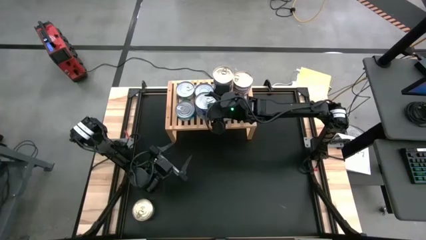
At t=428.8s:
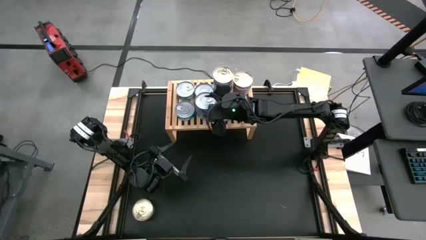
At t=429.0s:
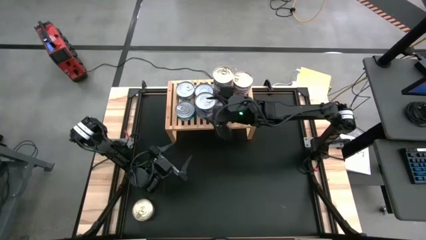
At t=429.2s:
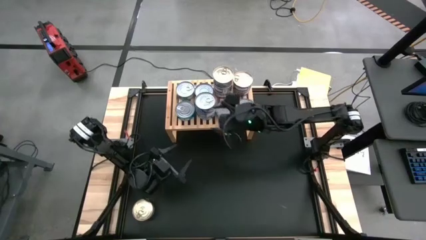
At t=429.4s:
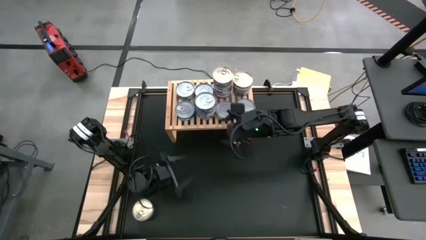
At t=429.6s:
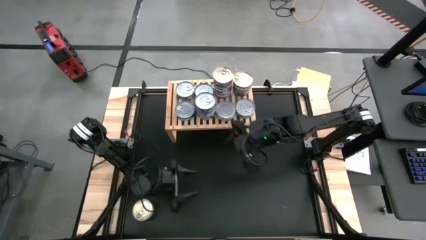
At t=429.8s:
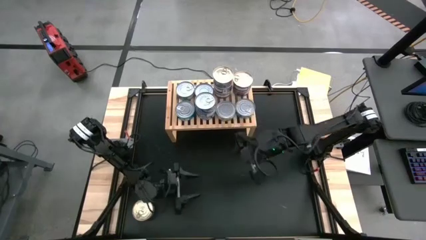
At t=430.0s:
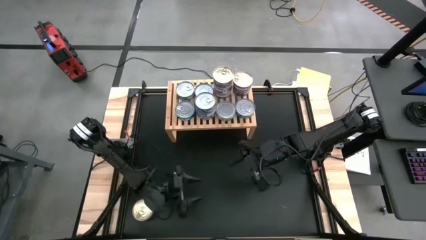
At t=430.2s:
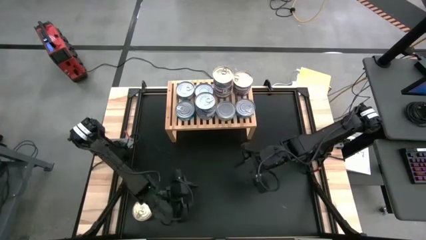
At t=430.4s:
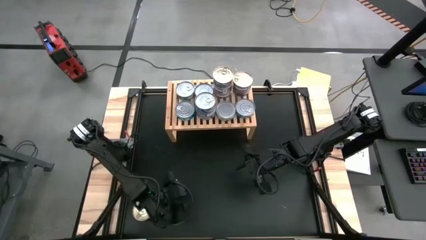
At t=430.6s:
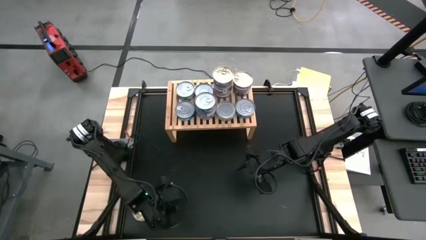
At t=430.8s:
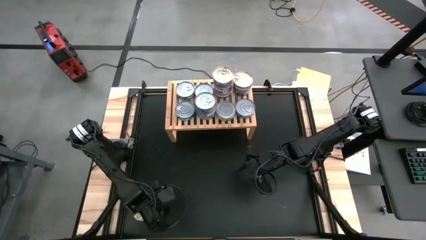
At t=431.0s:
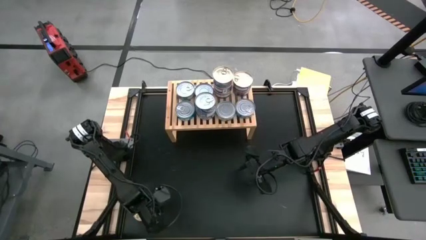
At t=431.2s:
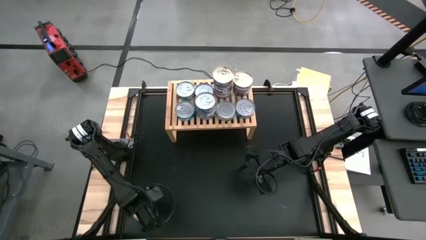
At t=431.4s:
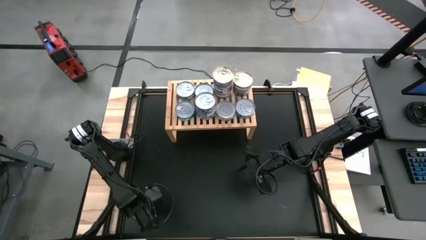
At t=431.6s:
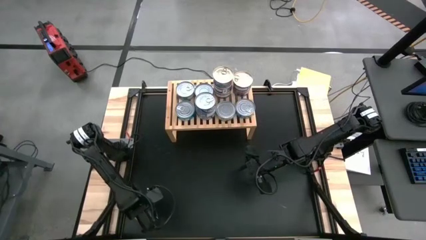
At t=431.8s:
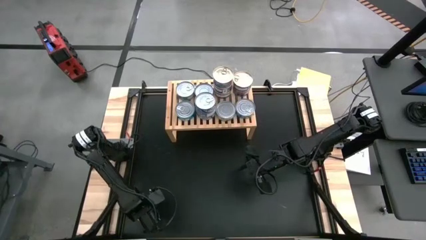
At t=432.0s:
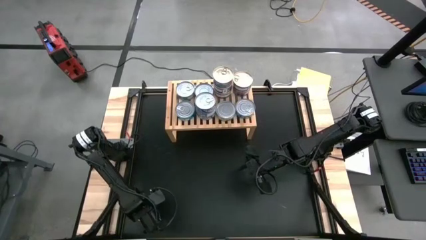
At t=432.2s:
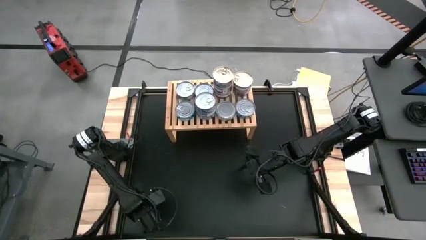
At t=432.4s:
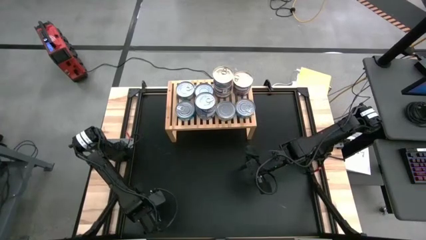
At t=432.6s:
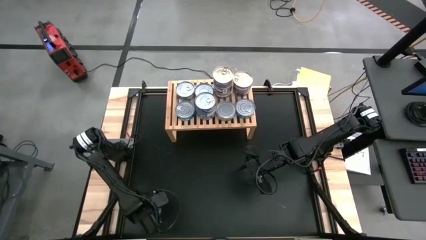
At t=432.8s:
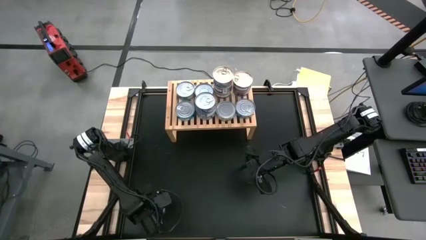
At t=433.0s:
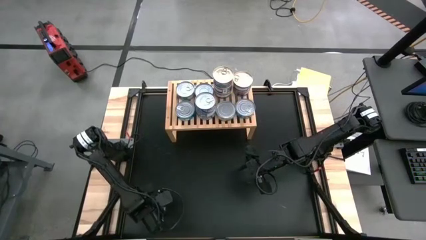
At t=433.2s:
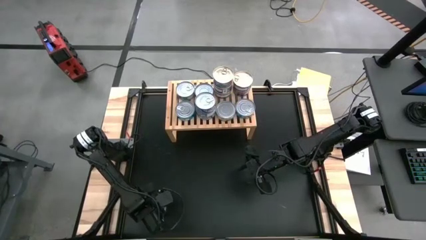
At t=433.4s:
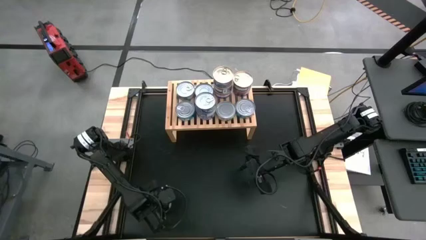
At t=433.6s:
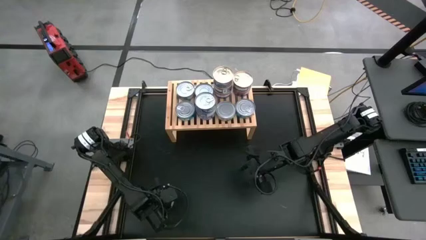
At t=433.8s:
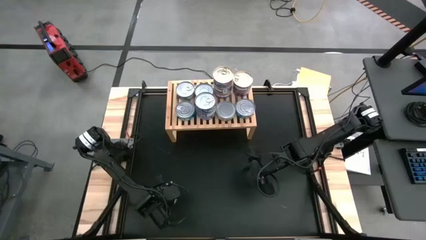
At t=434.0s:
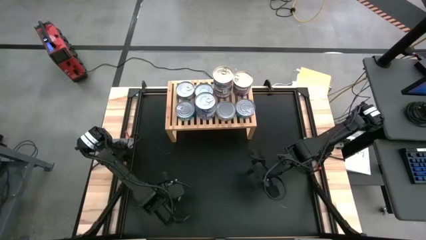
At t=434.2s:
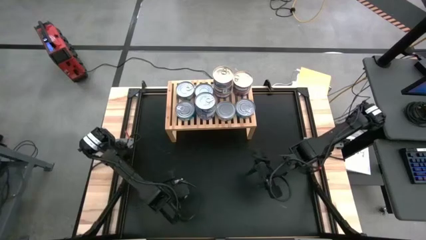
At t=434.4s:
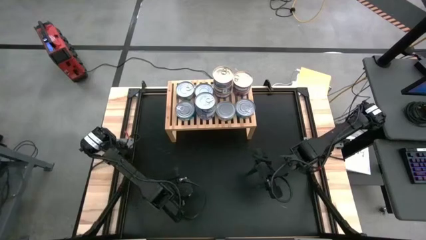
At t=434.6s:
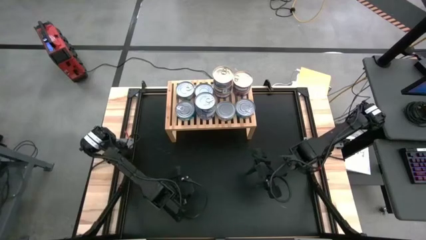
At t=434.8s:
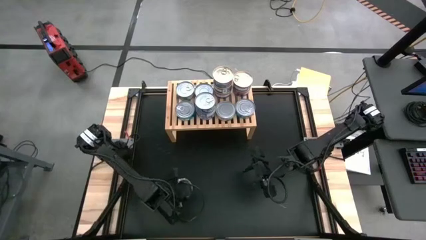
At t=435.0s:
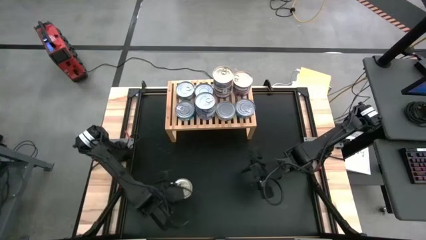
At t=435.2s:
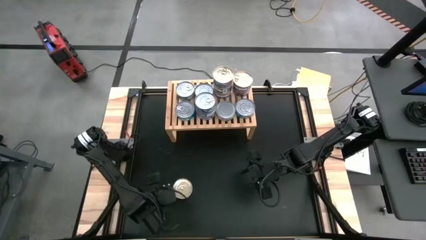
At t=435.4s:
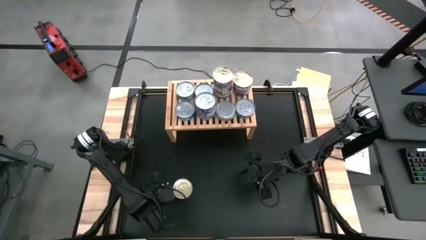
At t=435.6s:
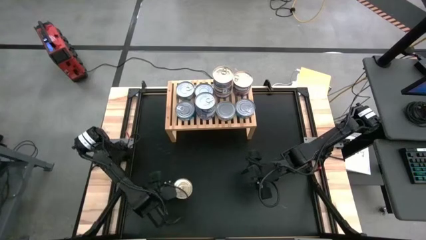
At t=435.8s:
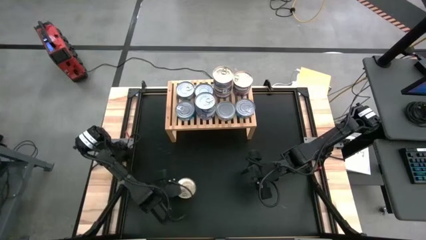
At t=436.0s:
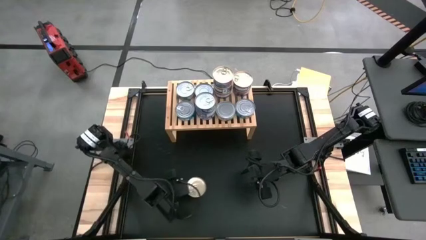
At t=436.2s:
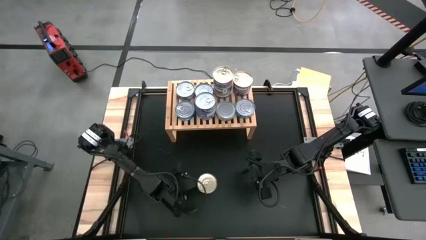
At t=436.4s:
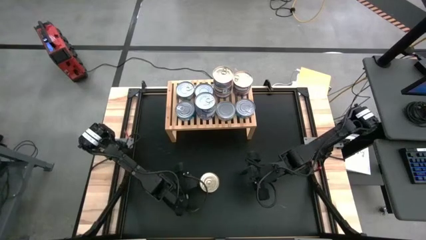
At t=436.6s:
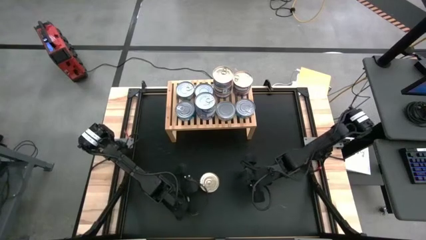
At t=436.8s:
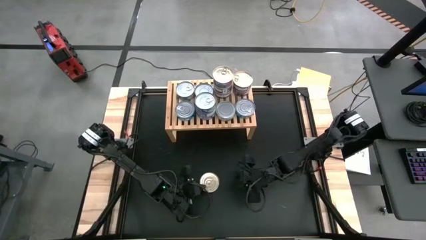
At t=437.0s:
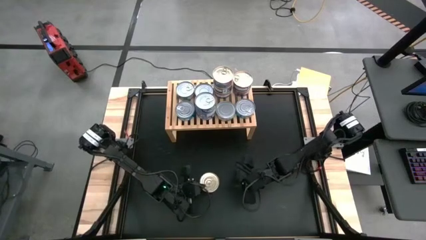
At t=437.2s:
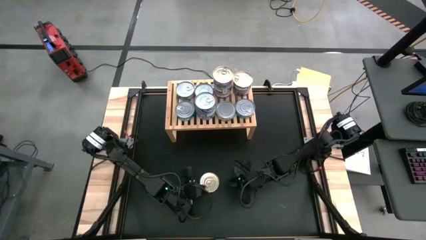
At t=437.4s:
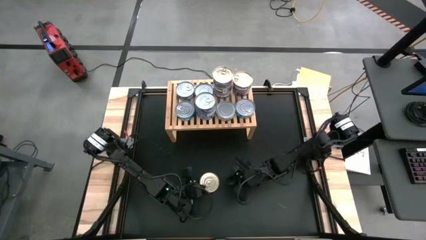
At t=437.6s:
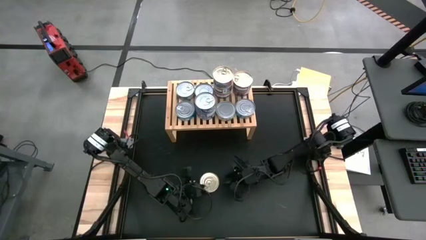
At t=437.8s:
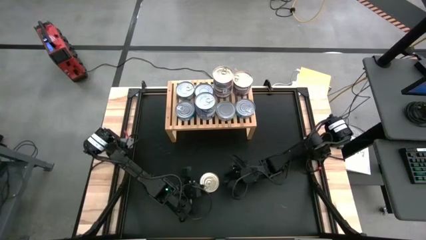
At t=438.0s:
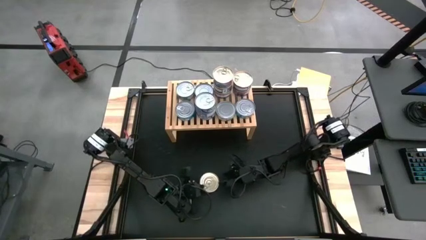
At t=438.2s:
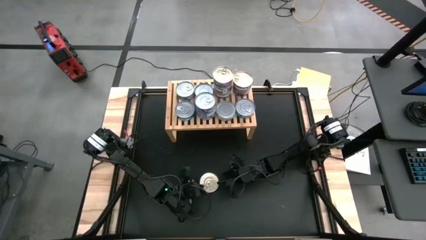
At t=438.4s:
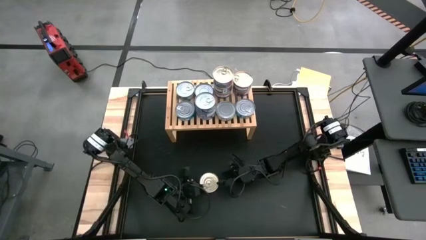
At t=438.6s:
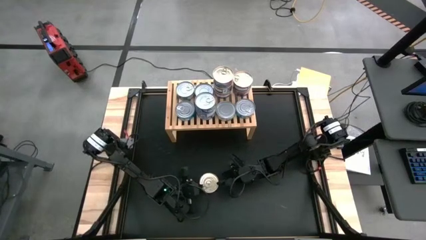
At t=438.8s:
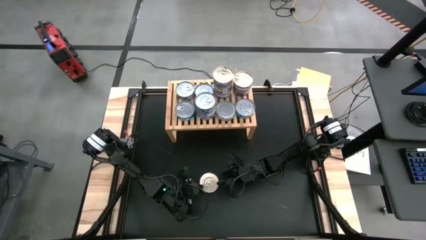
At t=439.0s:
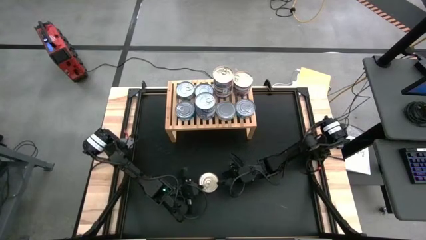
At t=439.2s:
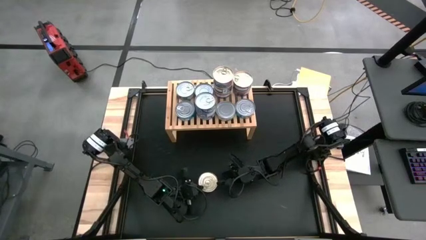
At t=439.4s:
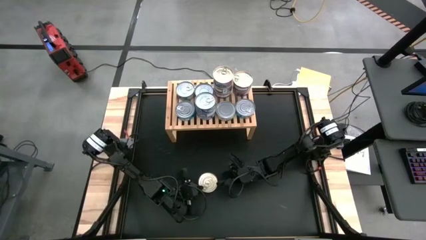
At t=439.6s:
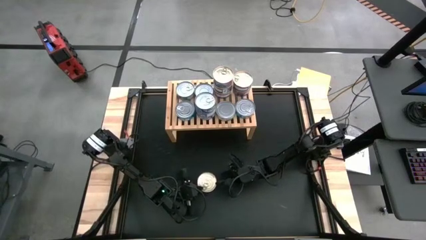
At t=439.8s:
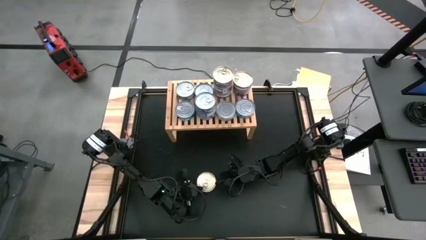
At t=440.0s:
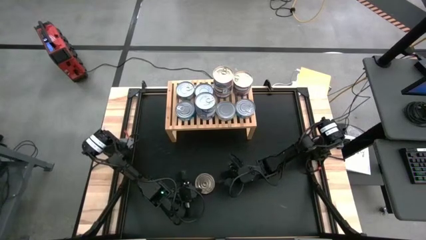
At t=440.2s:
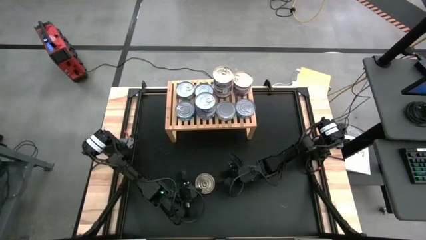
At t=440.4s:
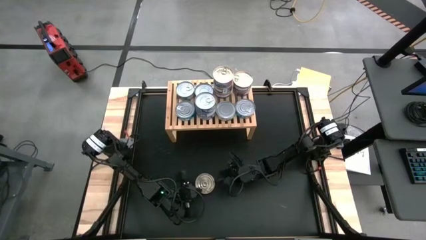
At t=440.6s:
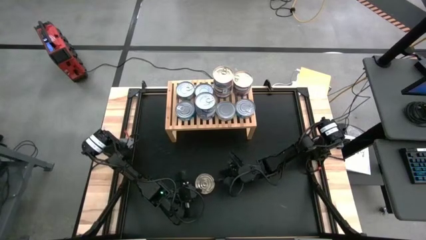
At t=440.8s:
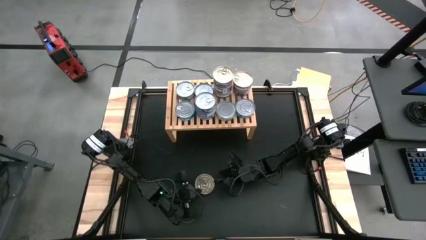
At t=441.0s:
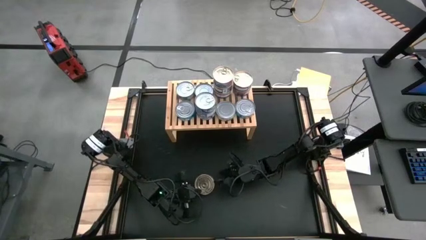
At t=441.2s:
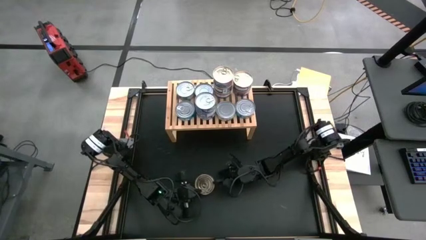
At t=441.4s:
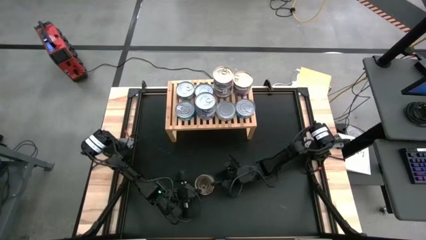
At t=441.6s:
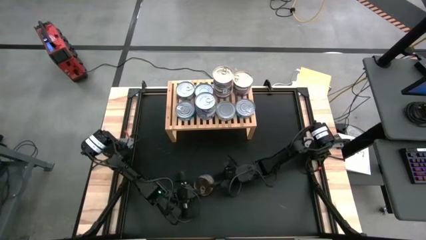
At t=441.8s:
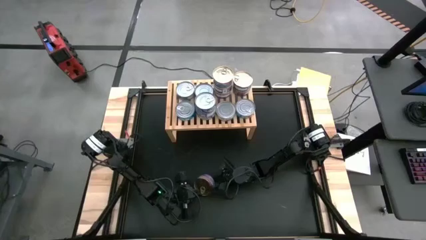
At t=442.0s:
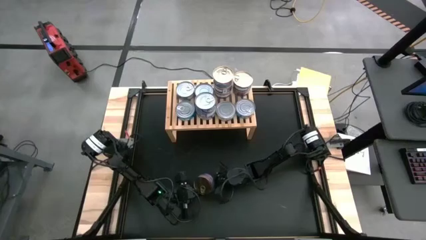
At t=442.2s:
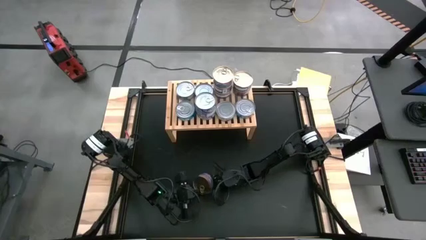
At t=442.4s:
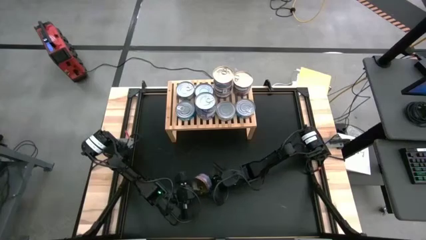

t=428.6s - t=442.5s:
Task: Stack canned seafood by type on shelf
Stack the blue and pink tuna can on top of the blue and pink tuna can

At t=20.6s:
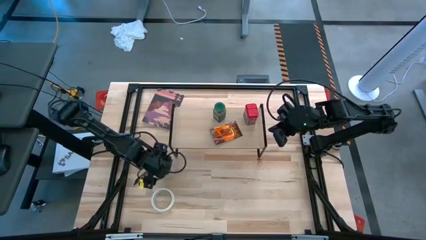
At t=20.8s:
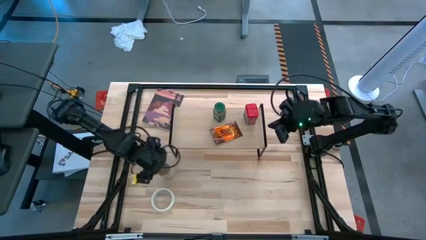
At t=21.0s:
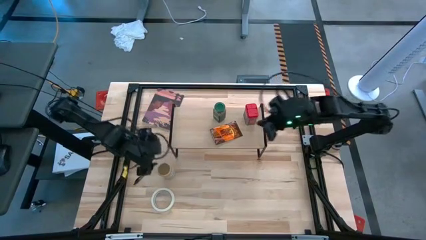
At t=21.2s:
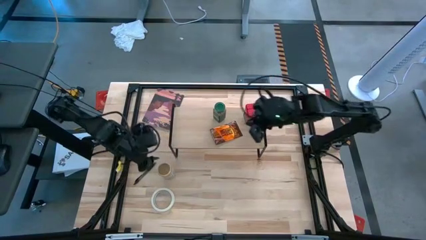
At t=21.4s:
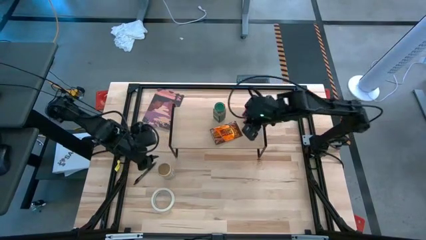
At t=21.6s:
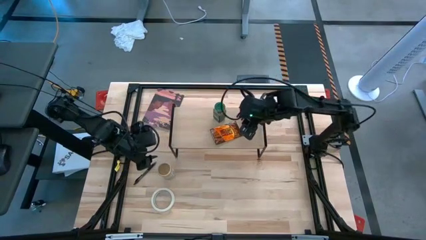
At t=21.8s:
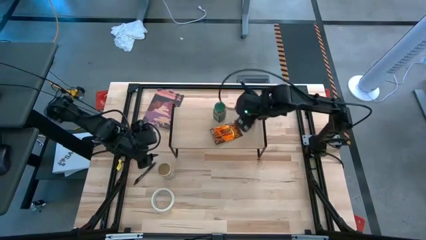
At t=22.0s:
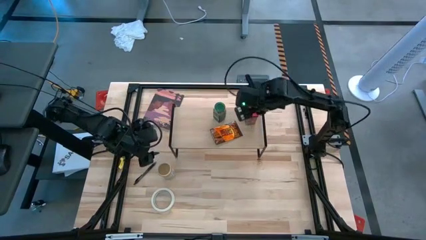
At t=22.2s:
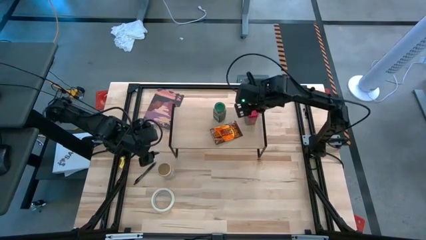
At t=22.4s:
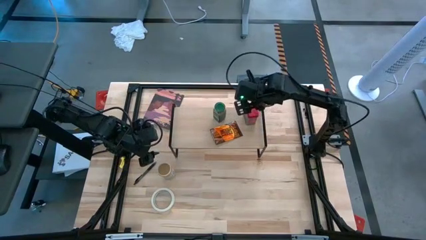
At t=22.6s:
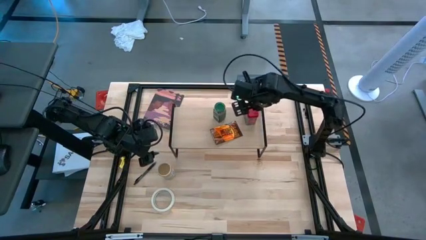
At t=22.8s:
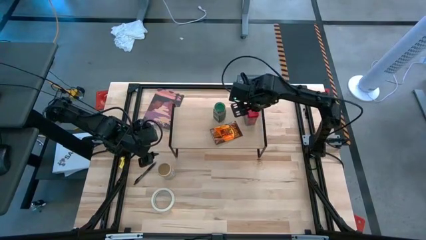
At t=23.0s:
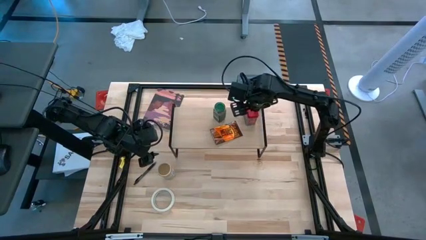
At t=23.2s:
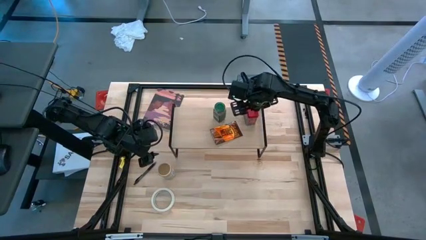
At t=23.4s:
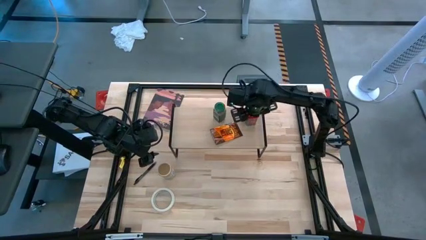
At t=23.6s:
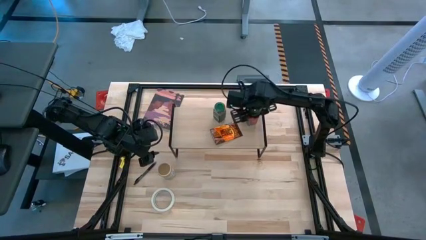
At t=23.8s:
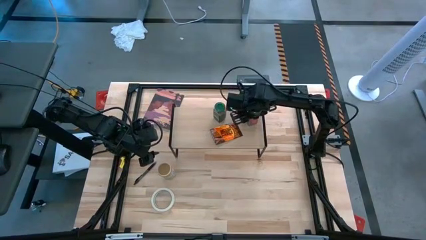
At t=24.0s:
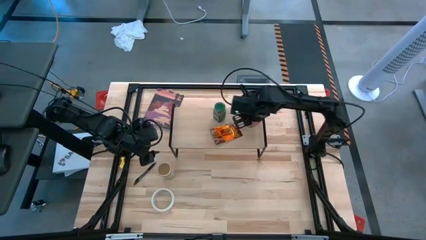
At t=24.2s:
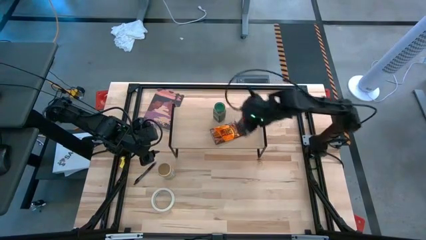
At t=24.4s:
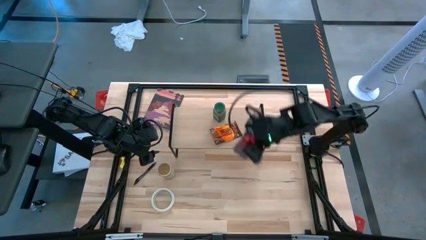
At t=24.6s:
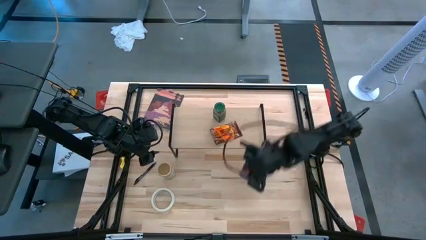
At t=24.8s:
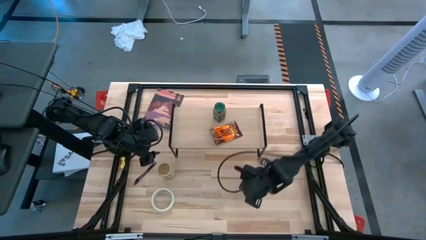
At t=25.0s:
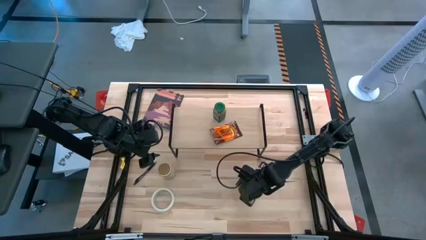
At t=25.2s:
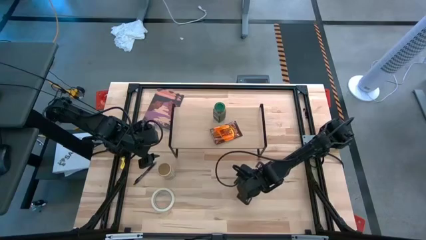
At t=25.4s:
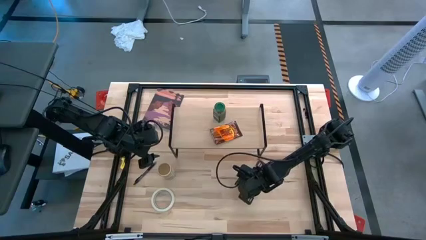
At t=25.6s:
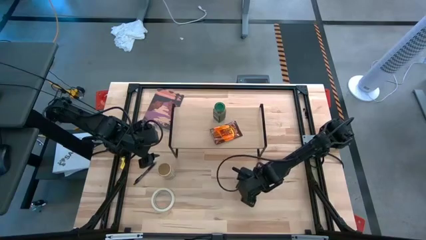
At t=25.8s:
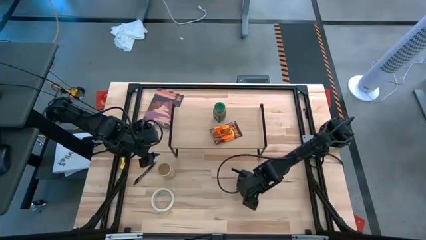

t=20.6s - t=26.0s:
Task: Shelf spices
Remove the red seasoning can from the shelf
